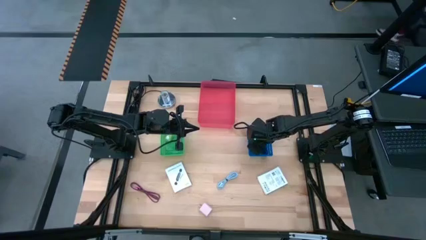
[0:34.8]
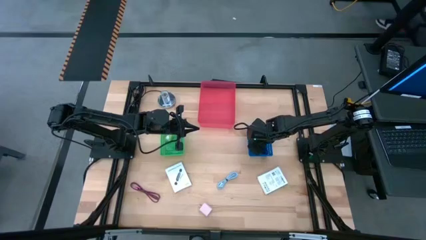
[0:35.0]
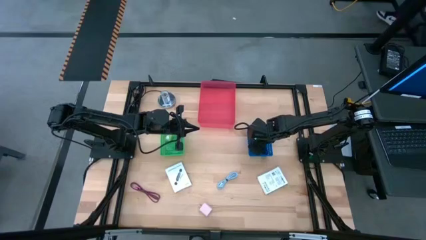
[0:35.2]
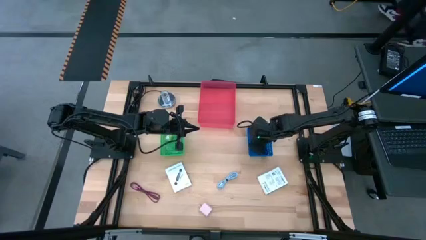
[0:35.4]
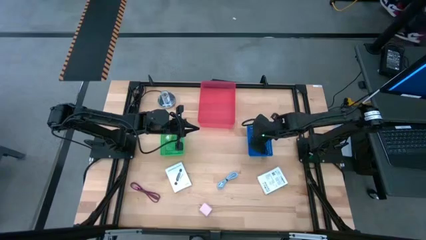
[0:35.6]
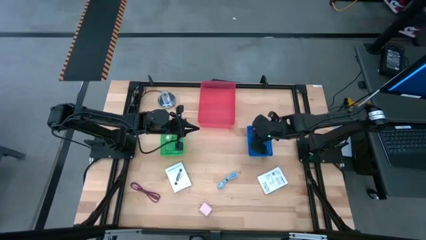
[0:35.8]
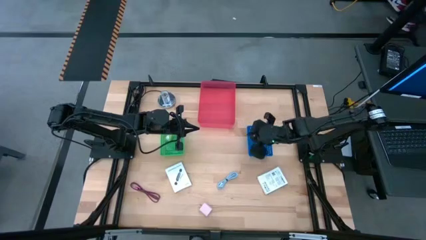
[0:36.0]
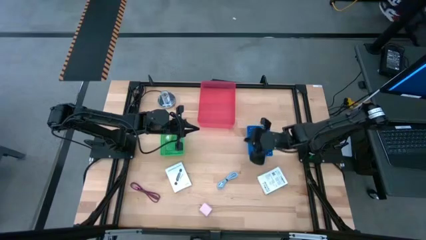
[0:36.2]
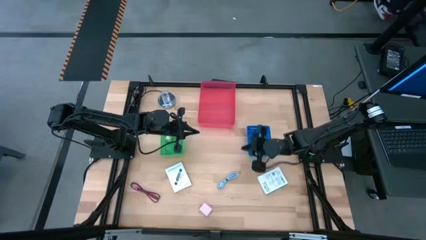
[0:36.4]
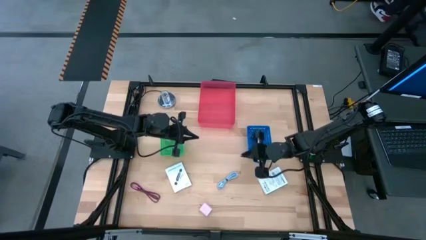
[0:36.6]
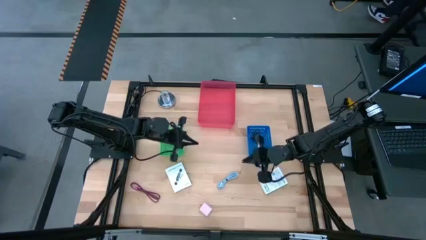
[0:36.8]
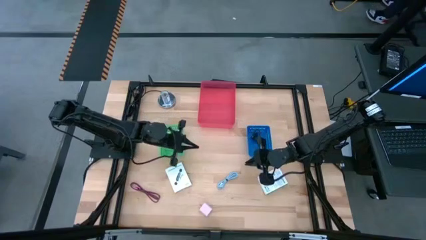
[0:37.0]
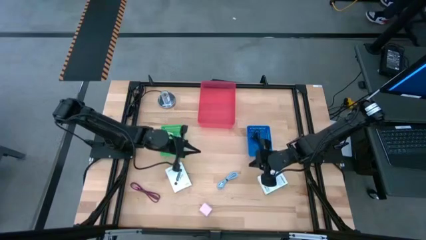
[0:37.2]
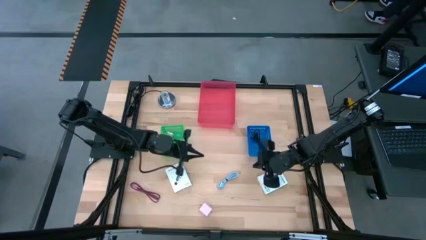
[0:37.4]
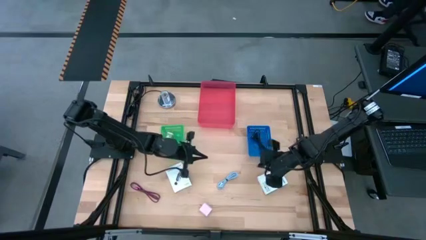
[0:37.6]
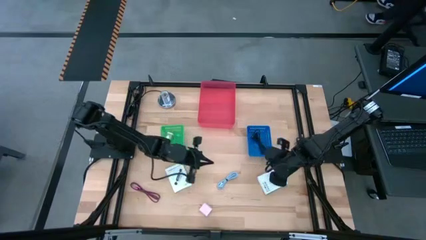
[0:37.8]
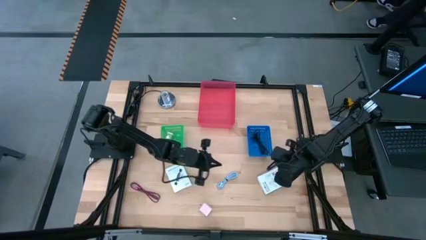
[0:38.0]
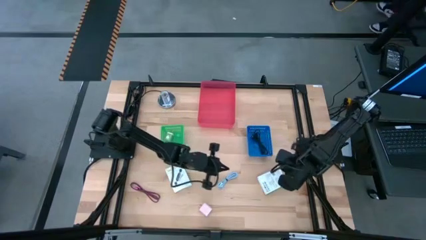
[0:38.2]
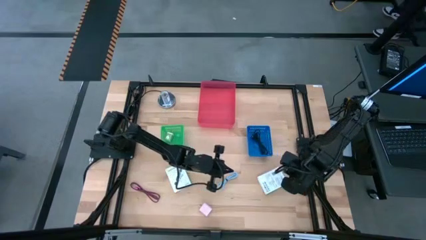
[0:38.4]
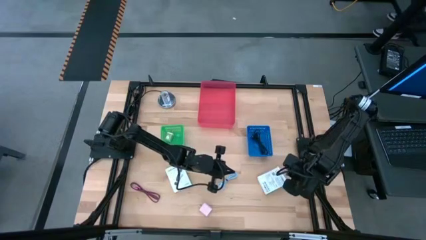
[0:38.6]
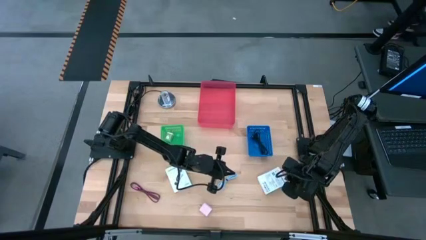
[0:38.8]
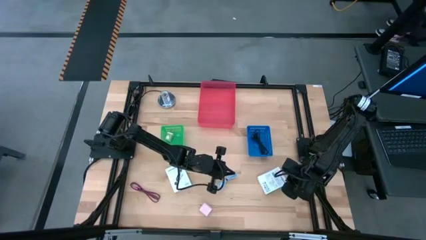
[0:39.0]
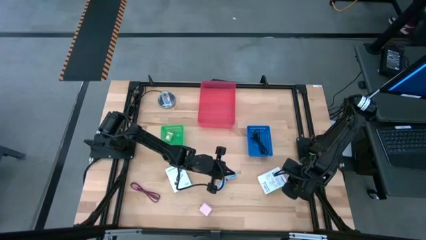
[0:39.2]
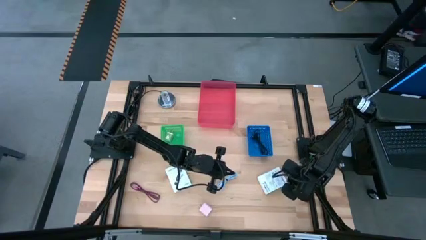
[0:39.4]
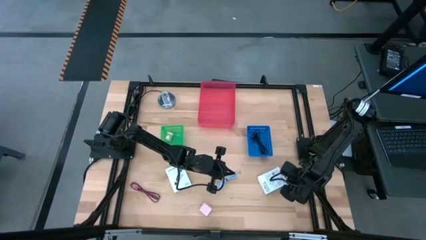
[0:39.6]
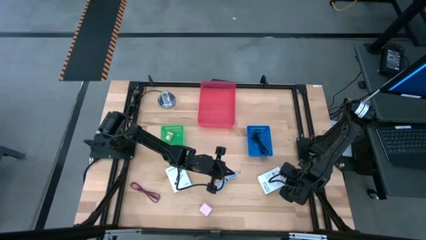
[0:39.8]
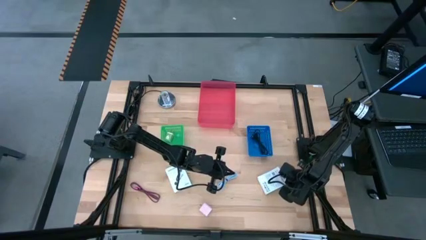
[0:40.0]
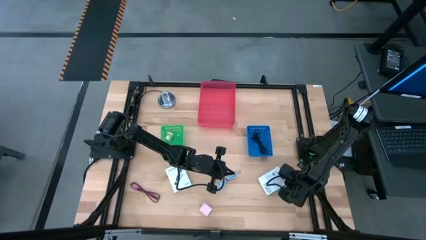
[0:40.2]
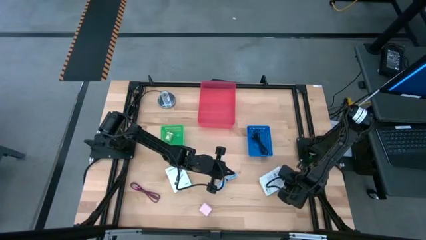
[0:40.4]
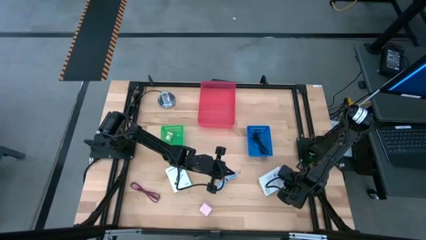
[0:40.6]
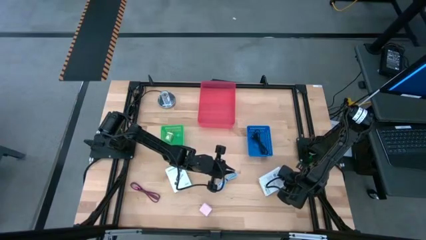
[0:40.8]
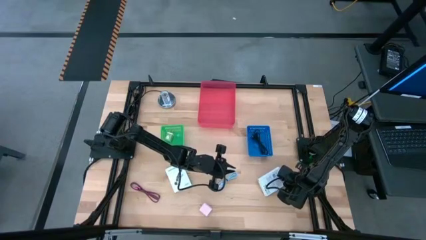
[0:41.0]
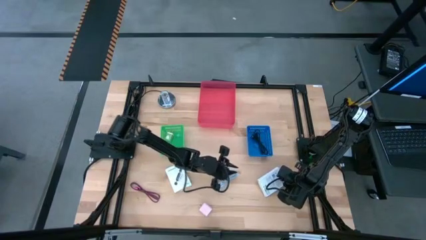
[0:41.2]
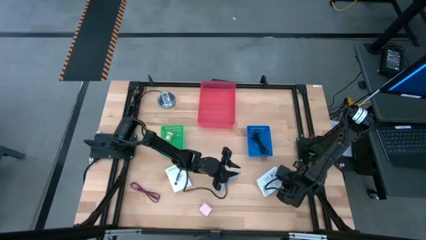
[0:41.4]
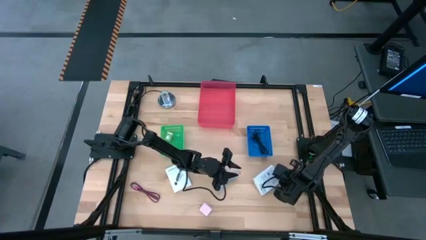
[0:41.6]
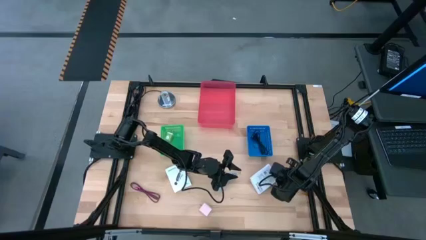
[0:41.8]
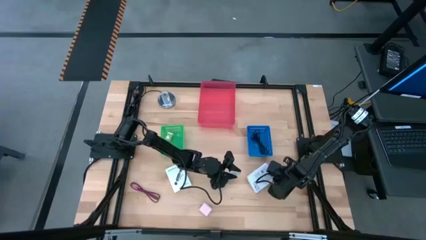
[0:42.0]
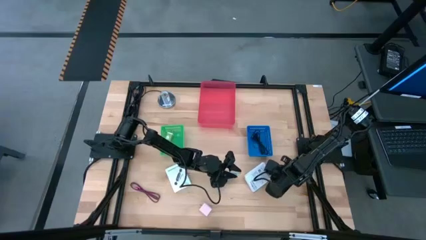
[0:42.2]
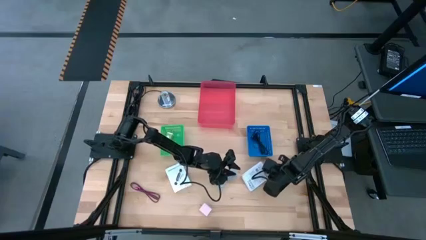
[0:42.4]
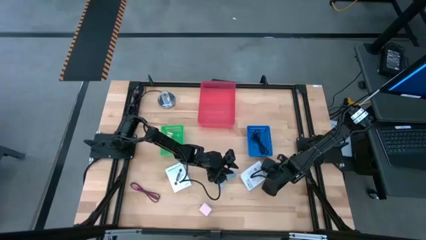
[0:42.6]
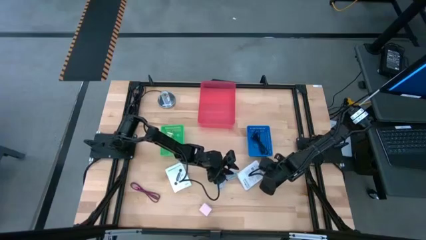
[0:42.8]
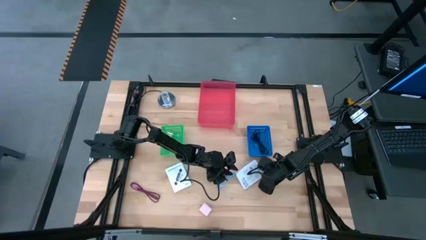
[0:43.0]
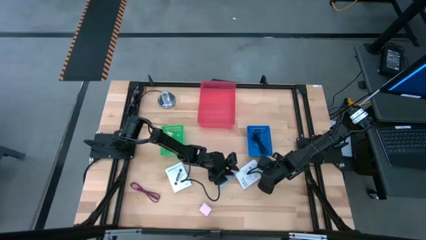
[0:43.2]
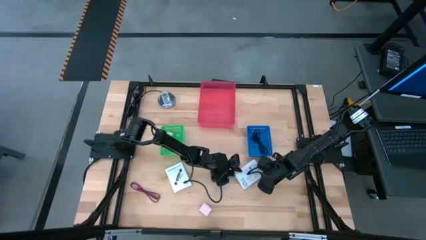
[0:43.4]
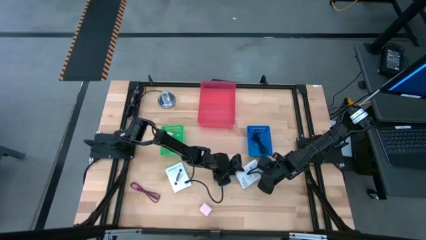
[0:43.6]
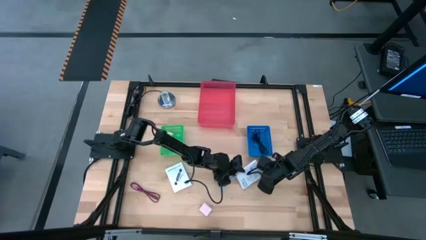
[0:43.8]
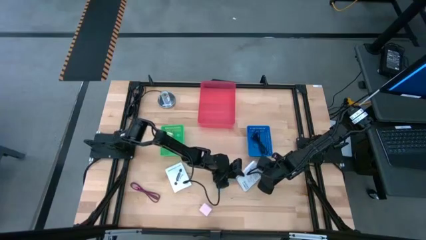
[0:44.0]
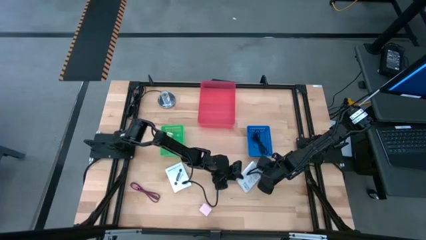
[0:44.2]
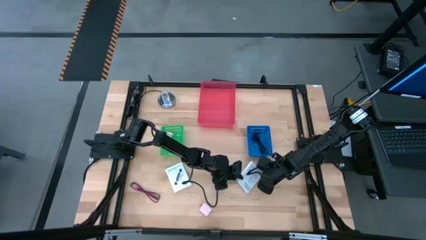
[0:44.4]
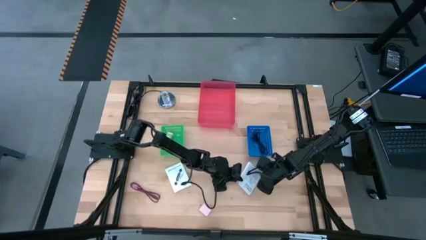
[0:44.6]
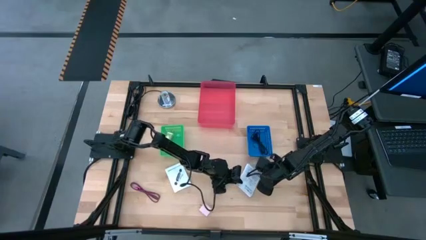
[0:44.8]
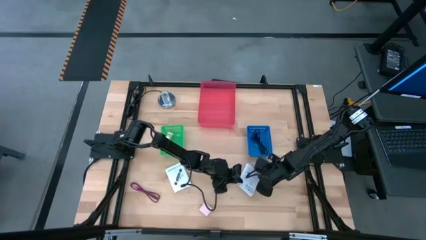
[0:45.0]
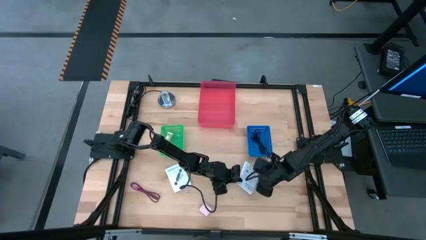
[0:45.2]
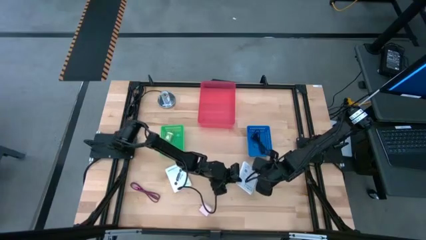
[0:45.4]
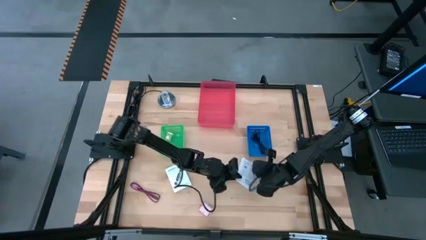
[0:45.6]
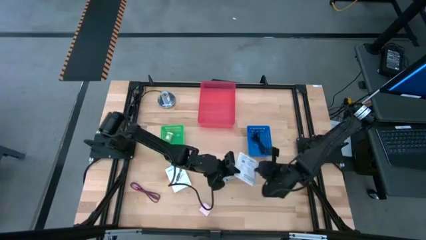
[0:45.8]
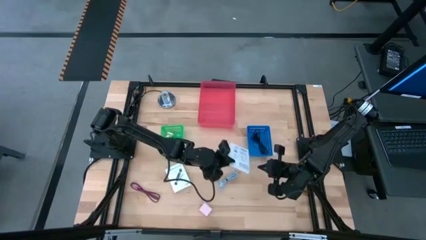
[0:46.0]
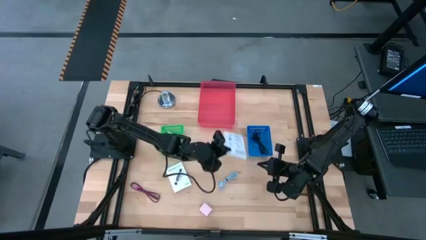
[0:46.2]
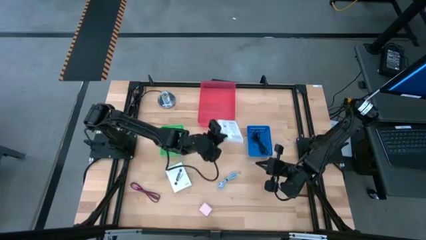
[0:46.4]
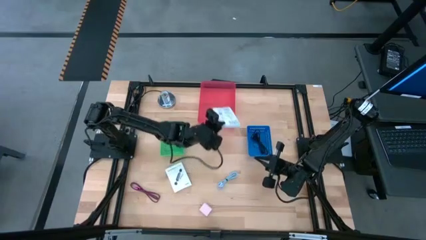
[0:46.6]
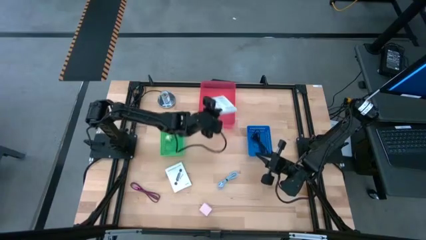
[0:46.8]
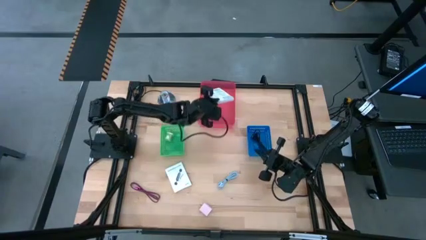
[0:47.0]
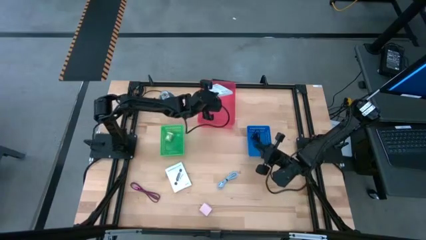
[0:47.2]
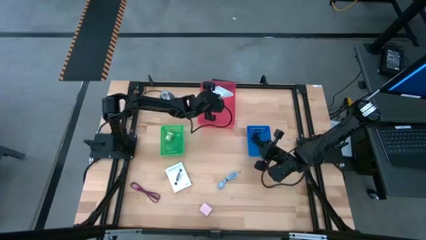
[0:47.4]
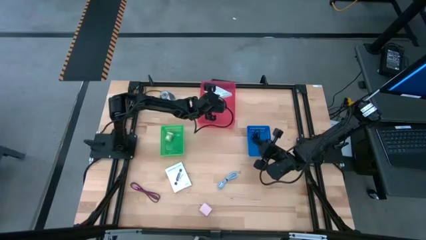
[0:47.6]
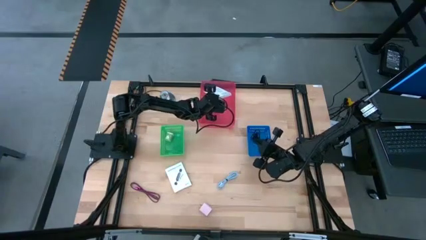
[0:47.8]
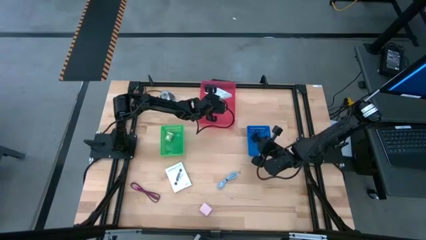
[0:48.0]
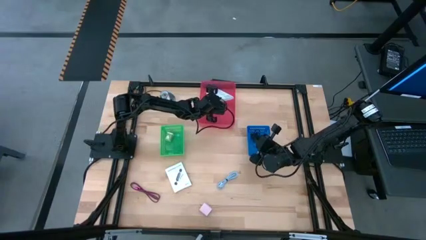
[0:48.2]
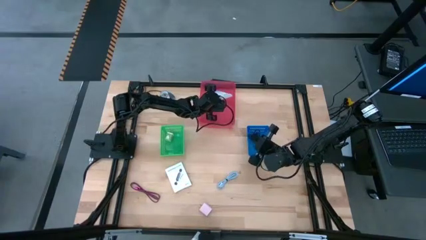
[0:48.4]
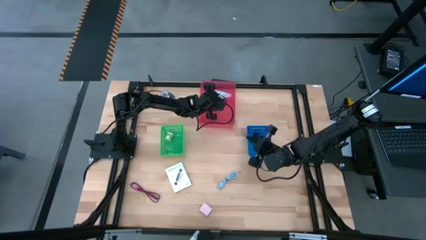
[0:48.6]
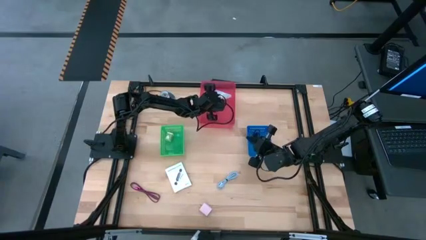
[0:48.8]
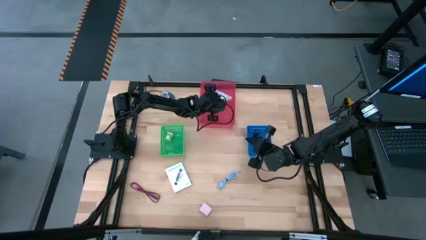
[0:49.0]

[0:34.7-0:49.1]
Task: Pick and place items into bin
Put the right white card reader box into the red basket
